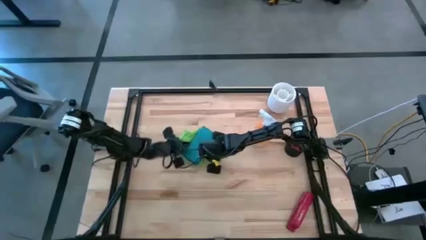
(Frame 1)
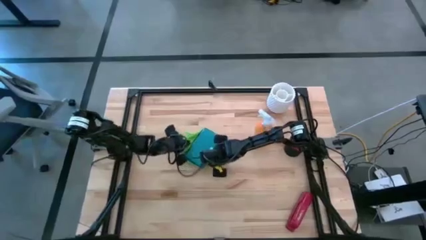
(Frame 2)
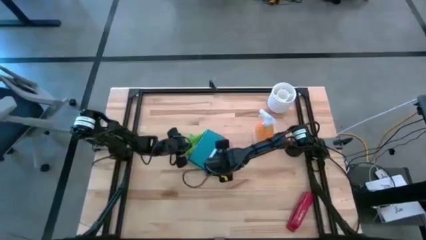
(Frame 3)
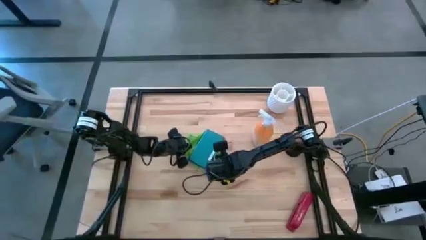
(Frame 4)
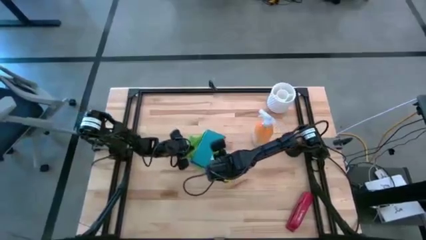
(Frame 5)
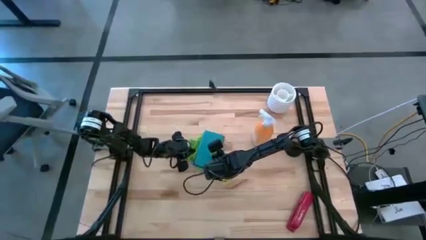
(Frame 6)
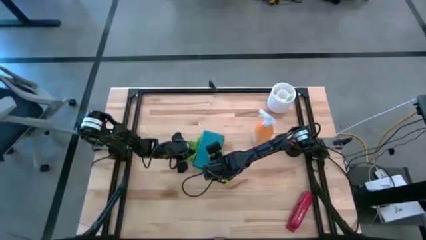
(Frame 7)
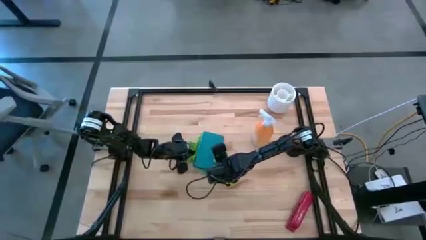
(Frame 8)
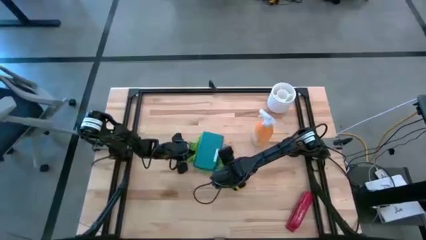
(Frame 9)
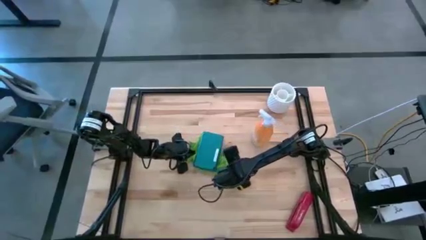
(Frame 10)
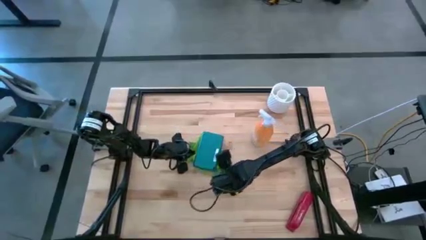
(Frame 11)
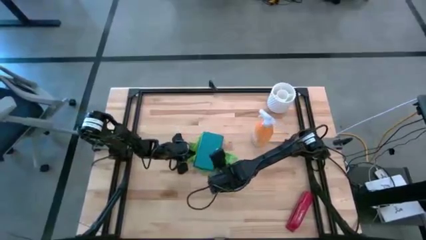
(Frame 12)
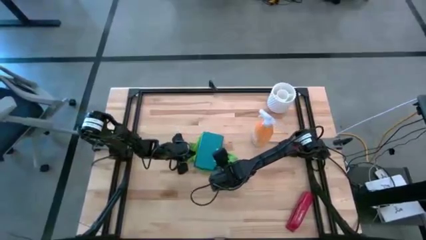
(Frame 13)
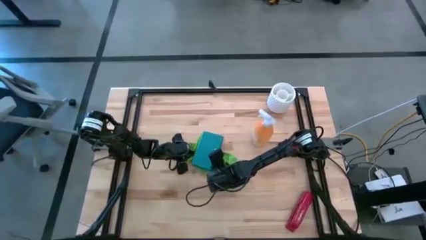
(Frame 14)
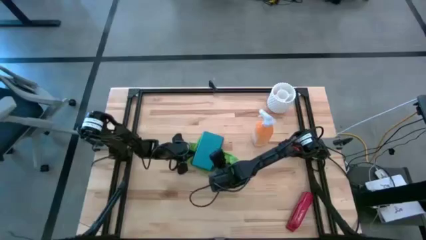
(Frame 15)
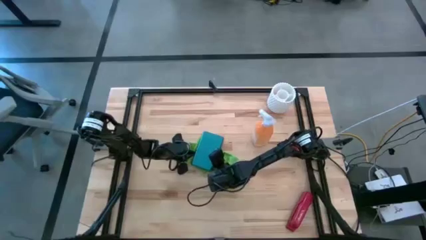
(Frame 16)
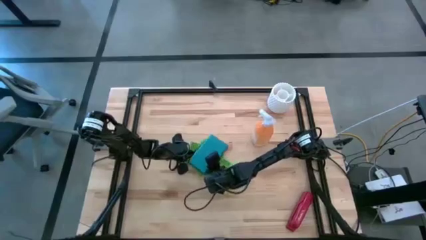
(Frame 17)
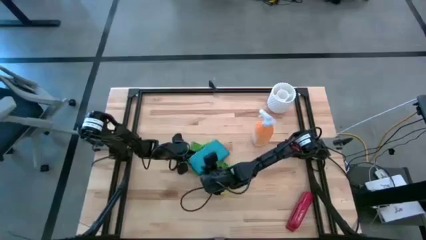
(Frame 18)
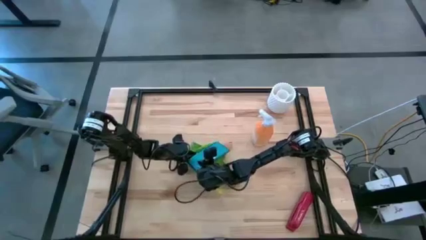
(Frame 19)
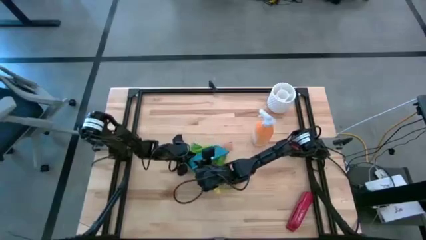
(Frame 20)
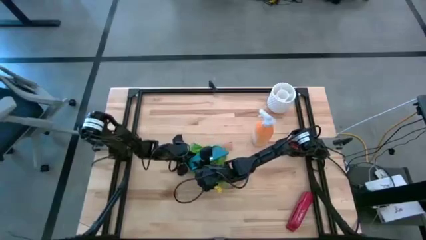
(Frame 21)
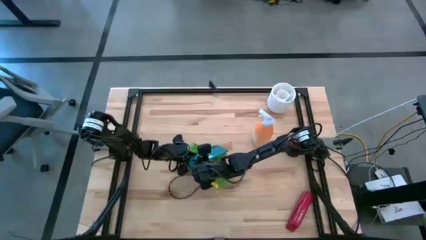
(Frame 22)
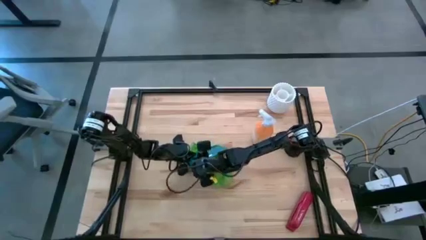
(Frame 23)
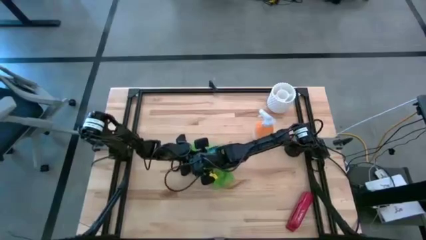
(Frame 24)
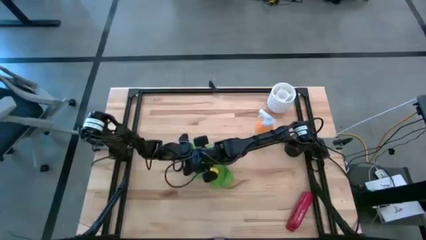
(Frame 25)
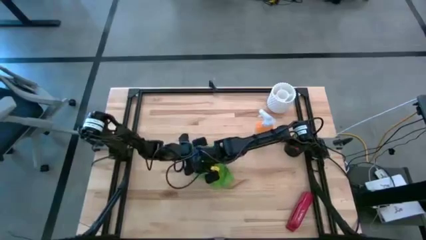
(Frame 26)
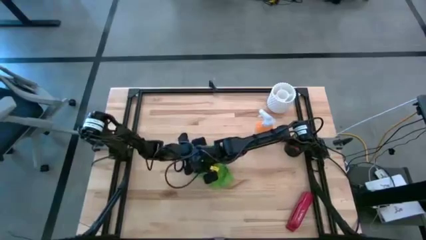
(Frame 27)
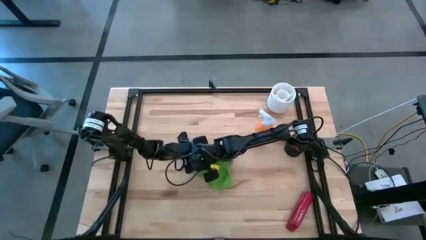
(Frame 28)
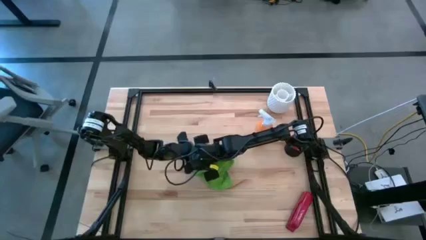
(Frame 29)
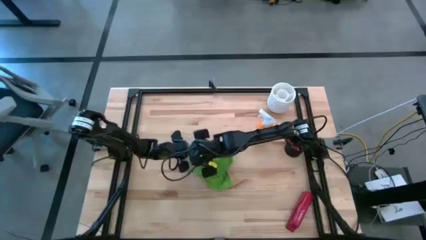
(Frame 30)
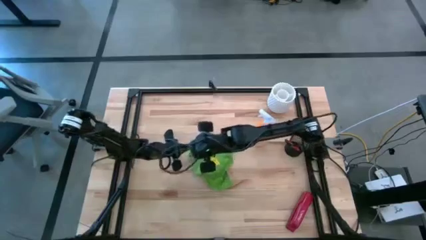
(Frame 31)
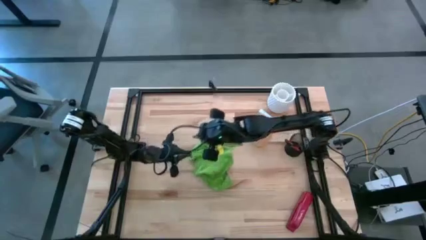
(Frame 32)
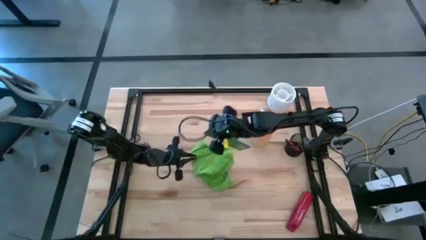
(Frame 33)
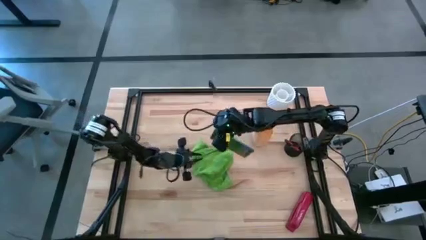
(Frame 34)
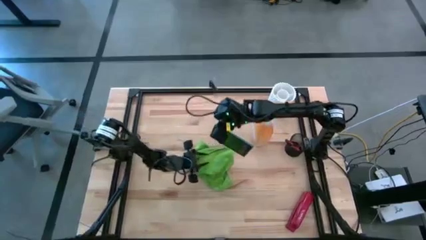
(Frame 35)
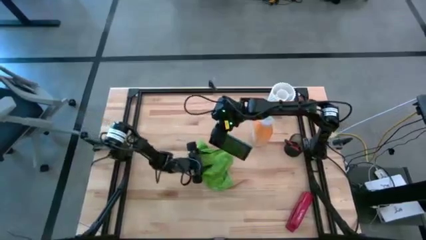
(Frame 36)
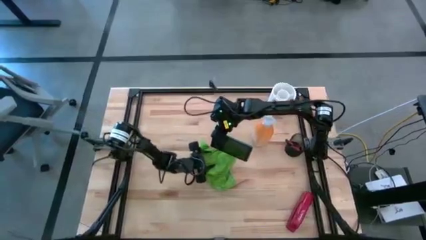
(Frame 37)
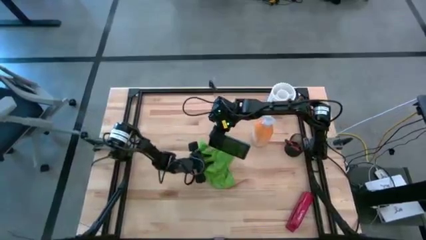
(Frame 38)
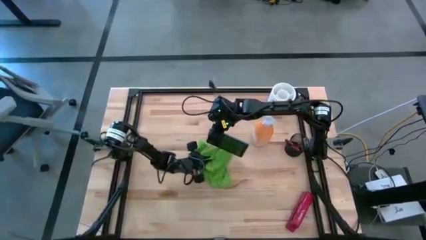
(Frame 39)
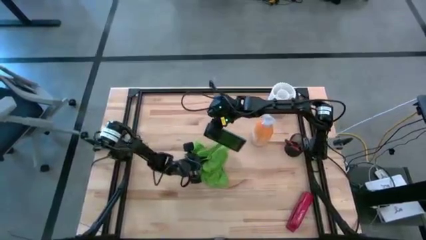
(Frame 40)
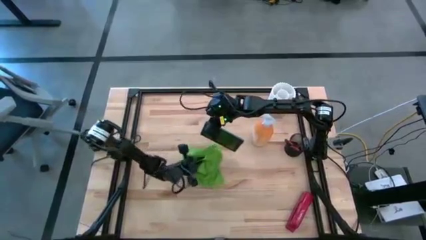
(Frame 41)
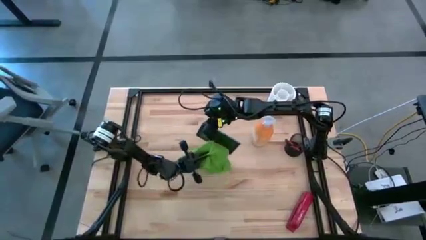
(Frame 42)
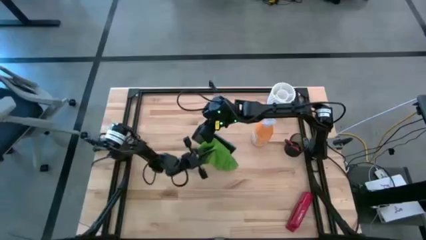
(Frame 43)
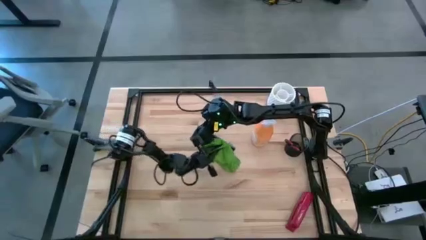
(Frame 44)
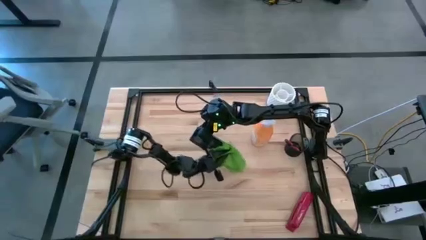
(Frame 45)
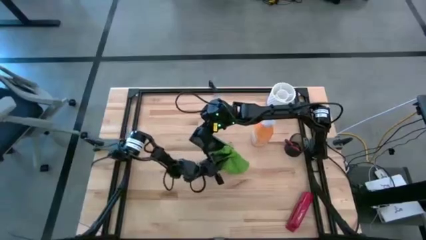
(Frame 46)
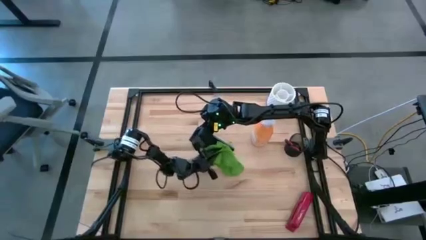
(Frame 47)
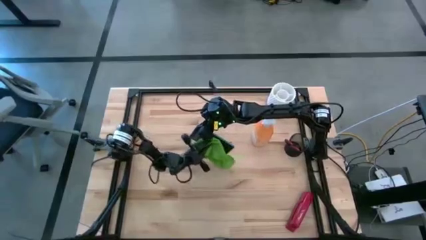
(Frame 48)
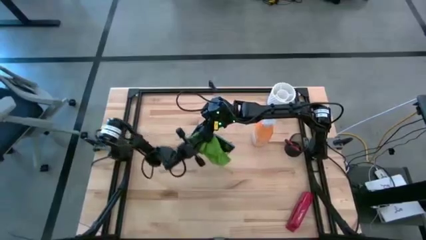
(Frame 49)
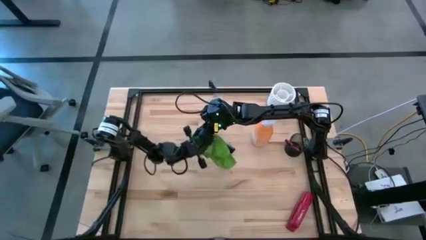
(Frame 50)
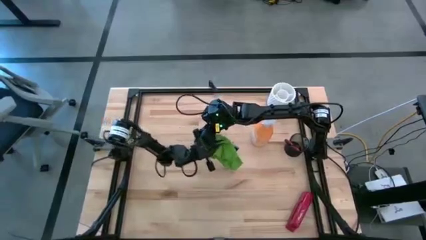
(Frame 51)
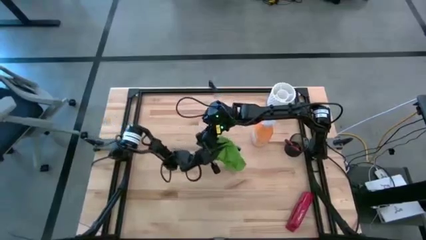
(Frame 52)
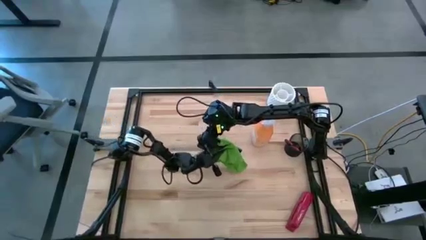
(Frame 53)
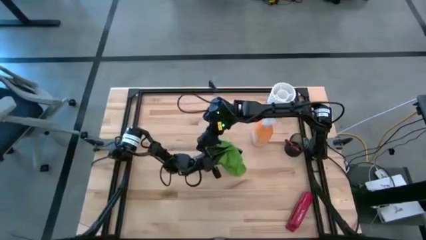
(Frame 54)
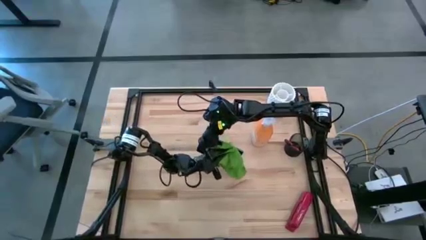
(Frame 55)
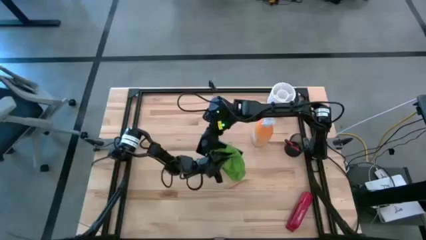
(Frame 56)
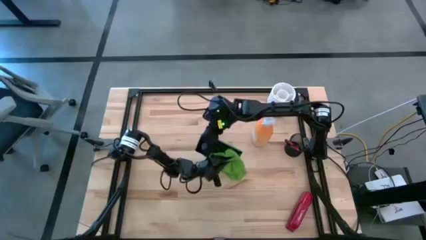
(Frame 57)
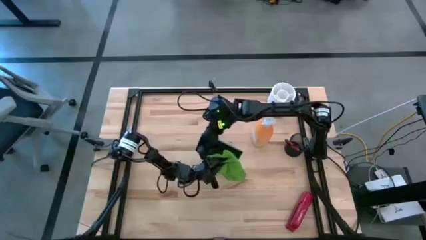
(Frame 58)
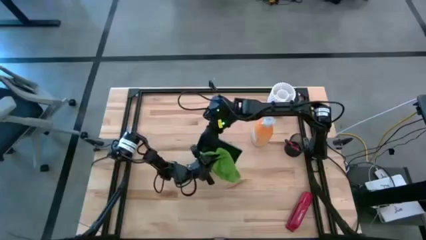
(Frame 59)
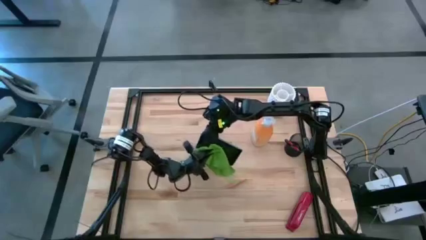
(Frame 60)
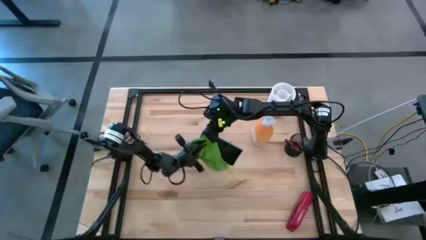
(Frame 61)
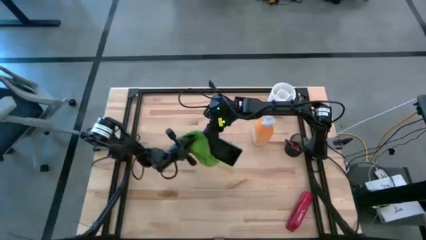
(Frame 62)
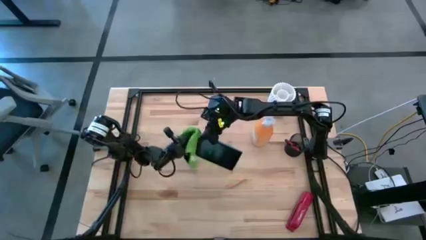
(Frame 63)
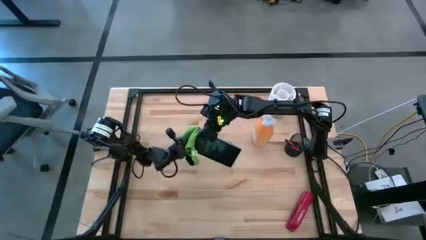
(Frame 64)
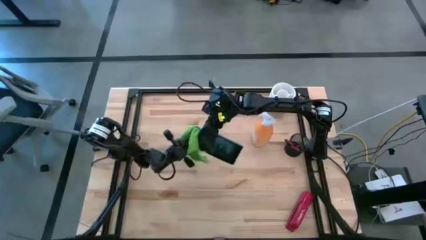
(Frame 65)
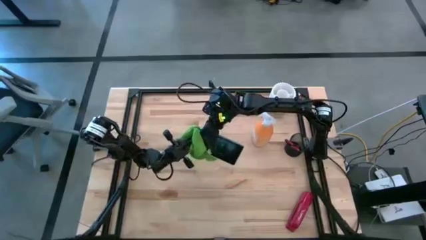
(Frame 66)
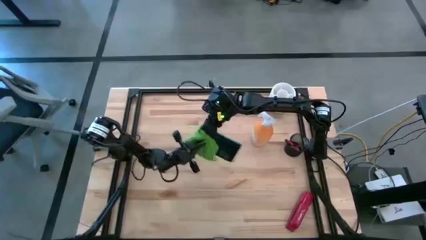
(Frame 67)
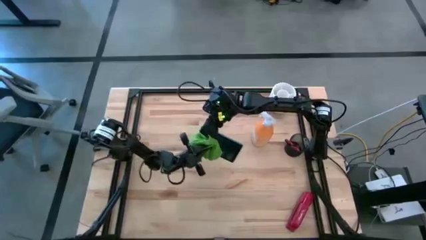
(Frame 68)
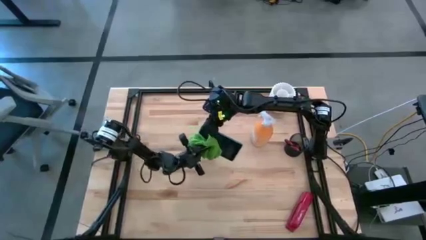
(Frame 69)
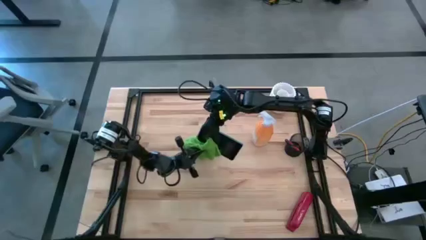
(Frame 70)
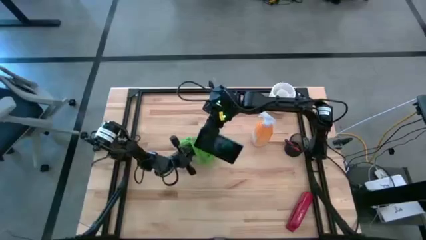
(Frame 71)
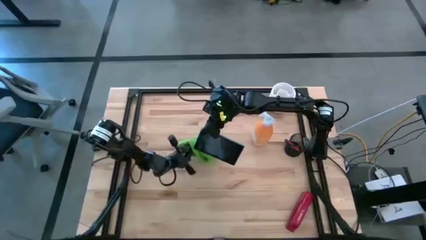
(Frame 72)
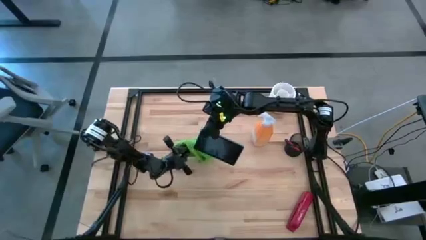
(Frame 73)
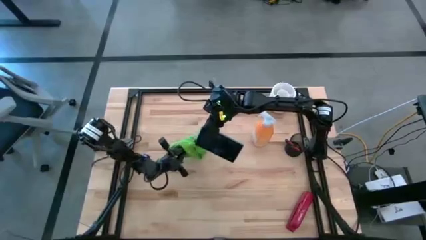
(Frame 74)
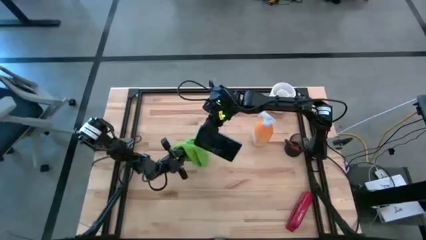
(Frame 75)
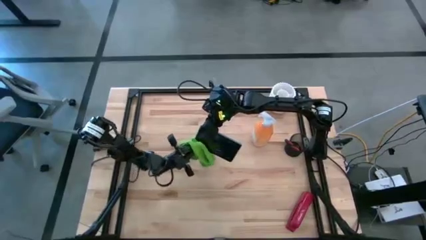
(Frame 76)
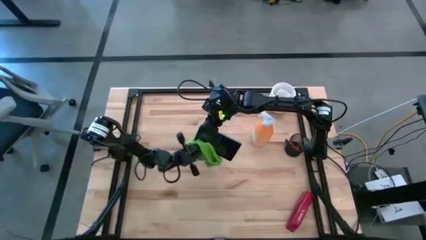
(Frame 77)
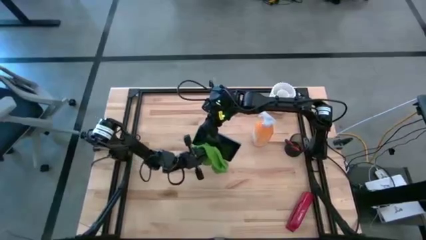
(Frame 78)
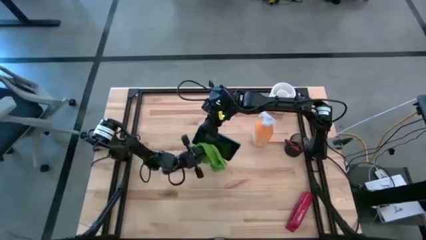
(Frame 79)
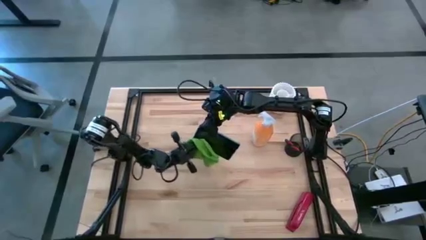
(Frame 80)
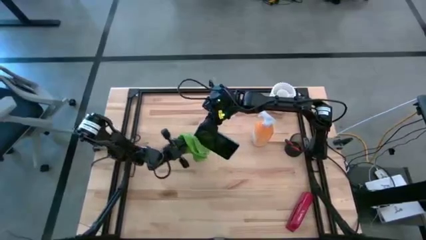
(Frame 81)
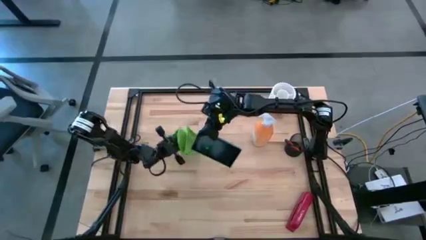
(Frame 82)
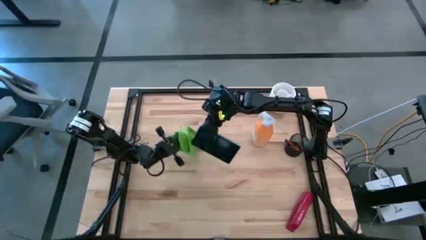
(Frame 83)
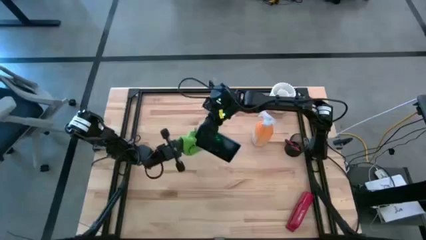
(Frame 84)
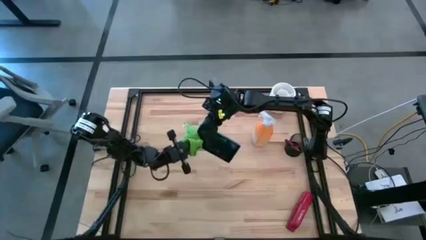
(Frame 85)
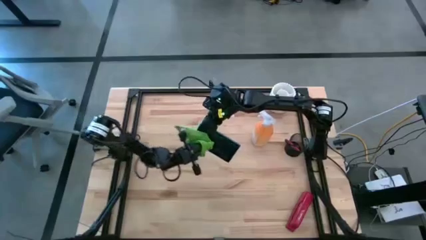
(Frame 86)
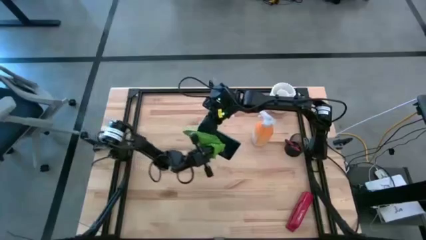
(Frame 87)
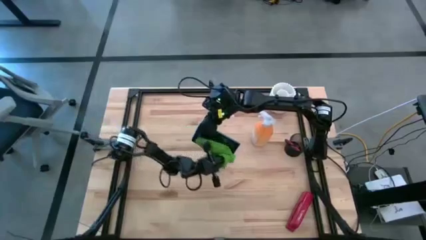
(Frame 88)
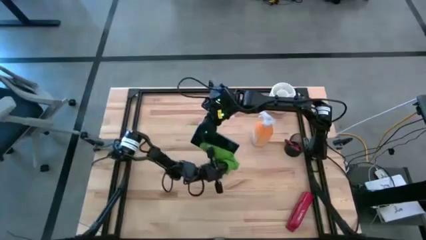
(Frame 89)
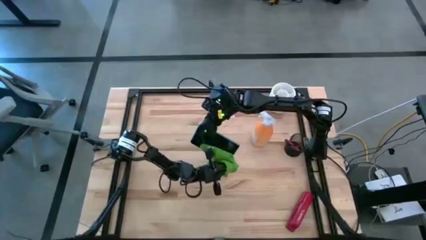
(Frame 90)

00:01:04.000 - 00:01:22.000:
Task: Apply microfiber cloth
Wipe the back and front of the tablet with the green microfiber cloth
